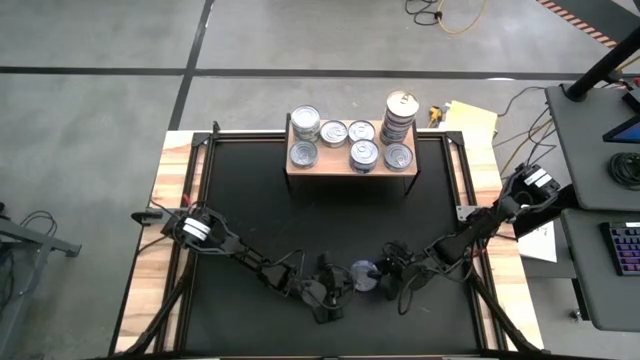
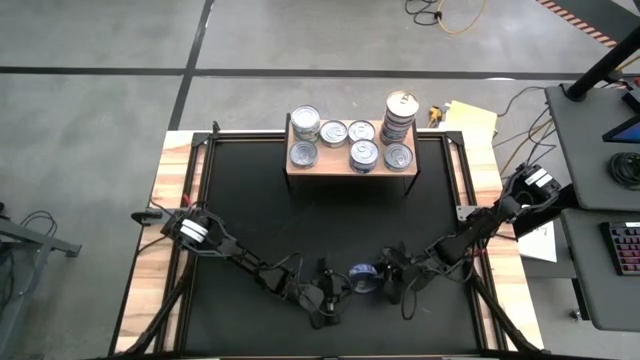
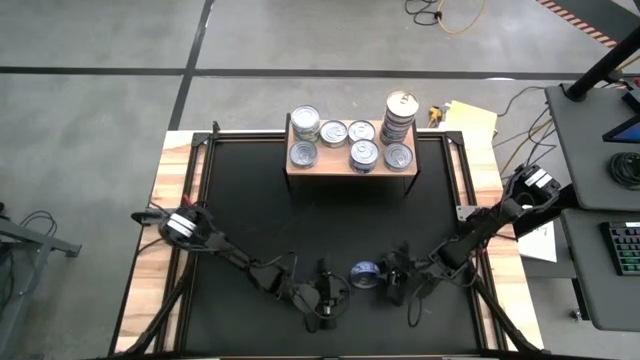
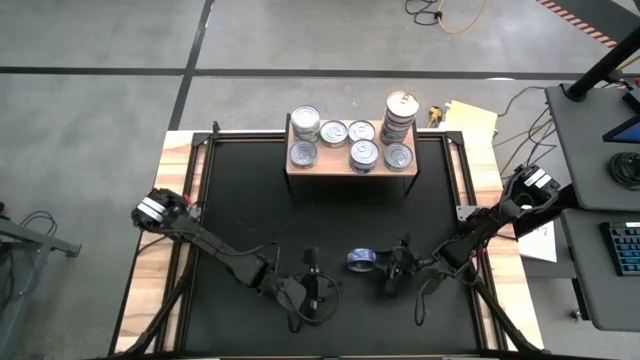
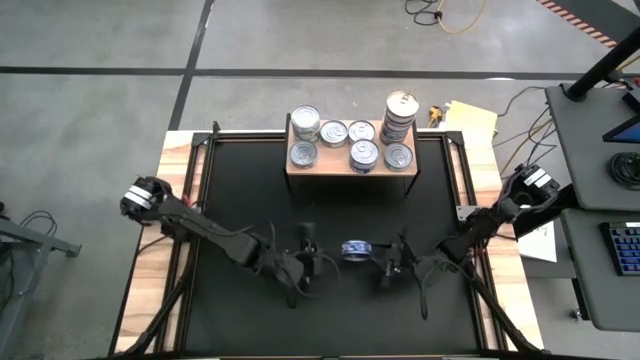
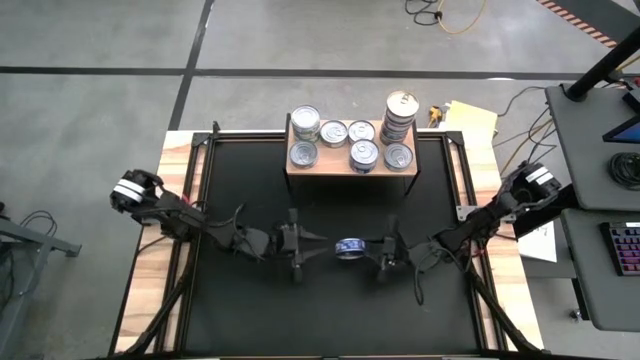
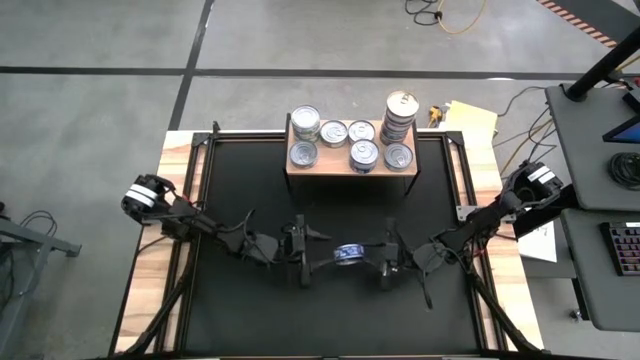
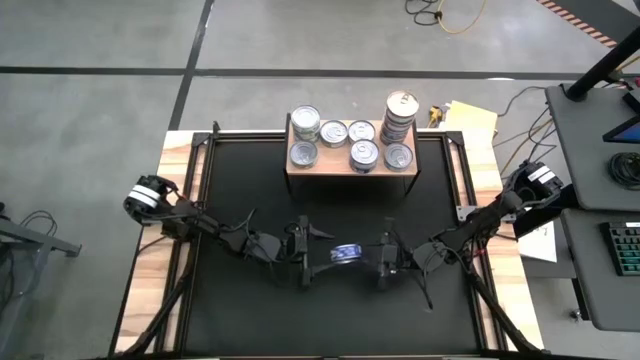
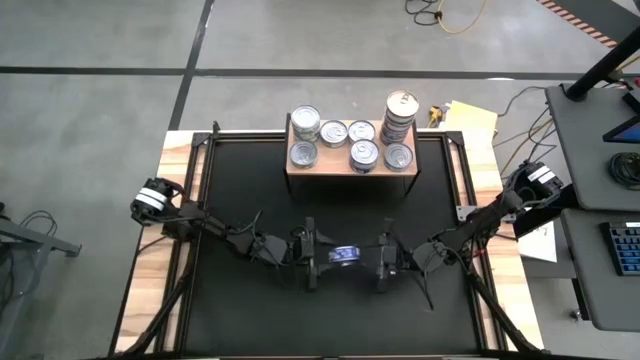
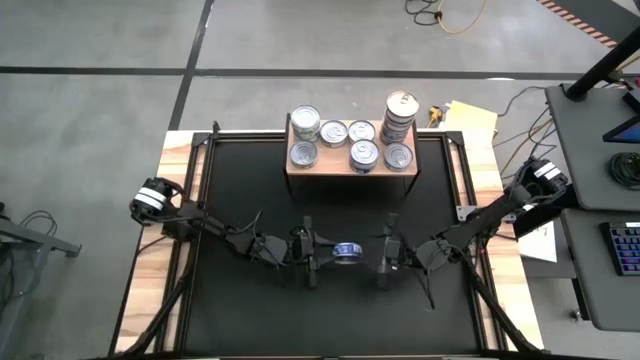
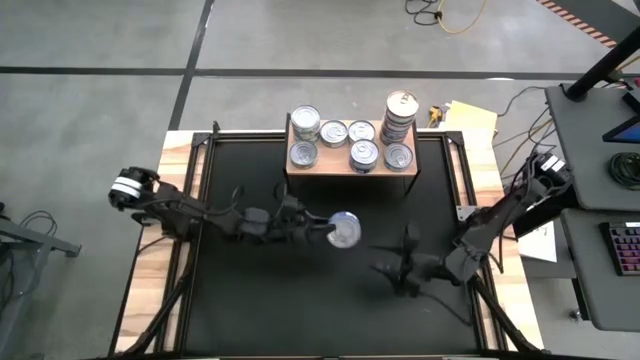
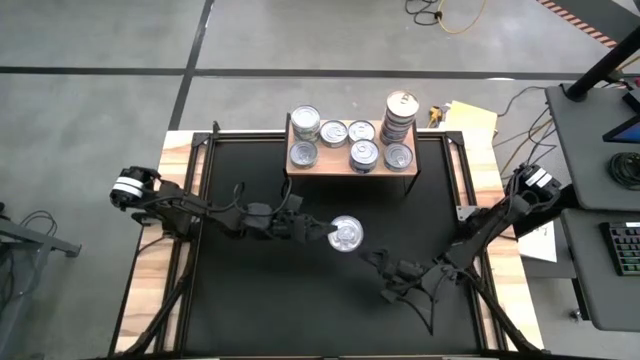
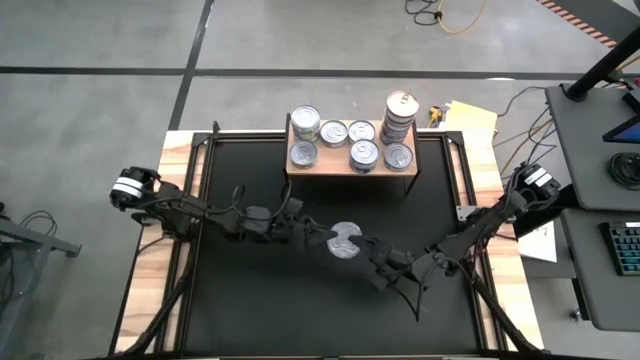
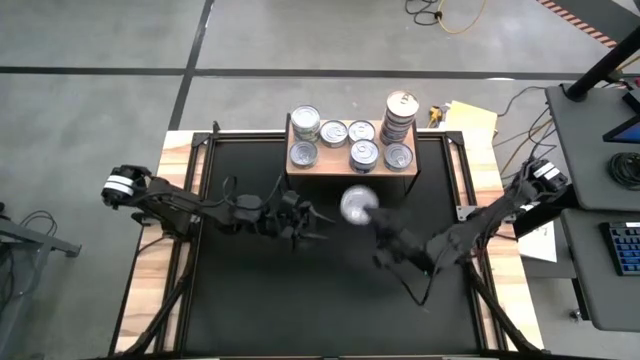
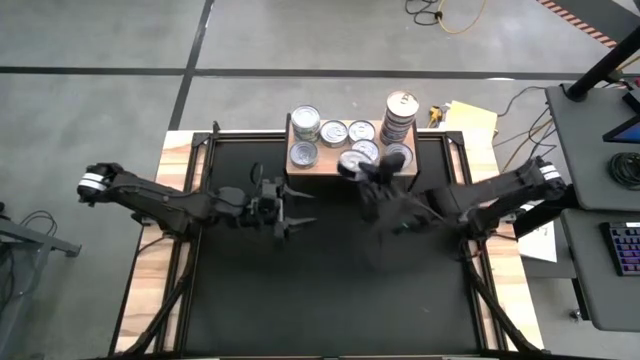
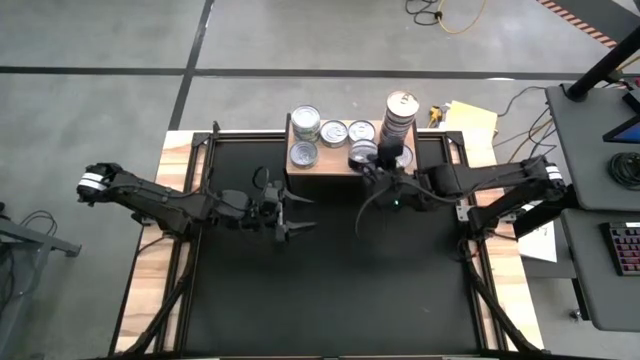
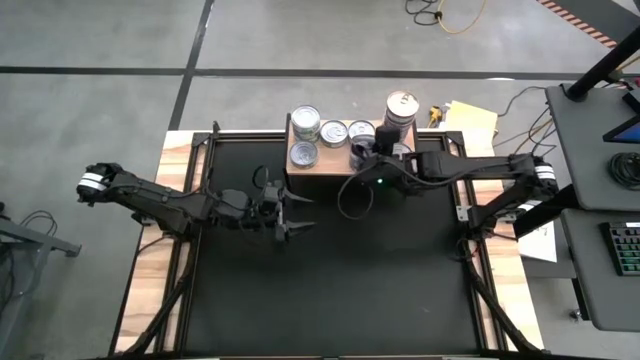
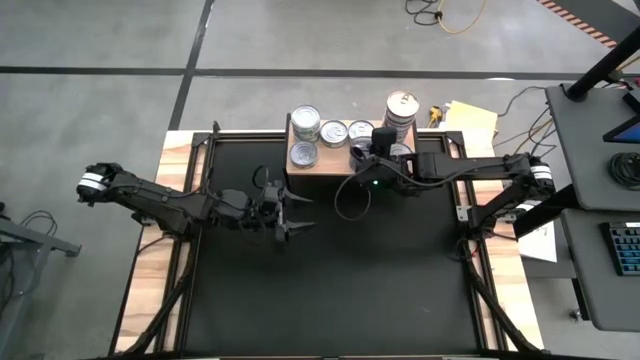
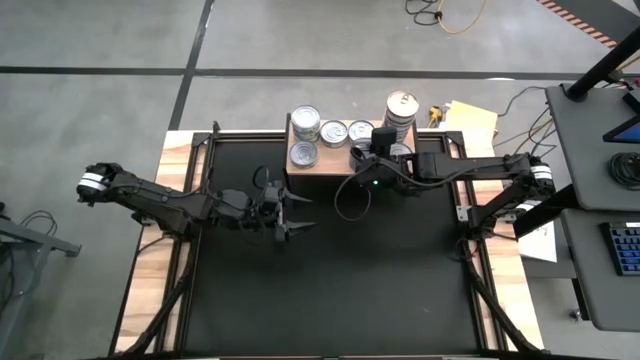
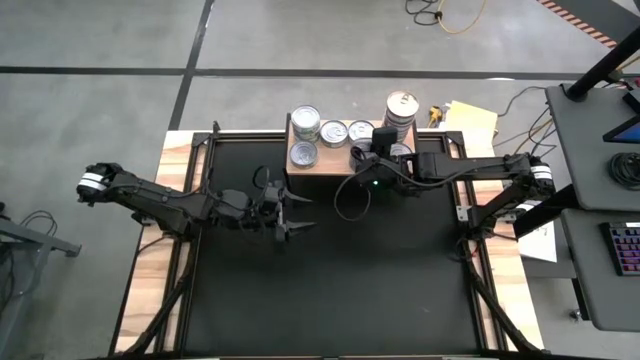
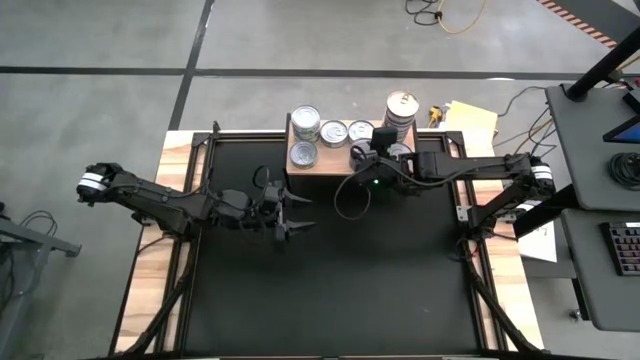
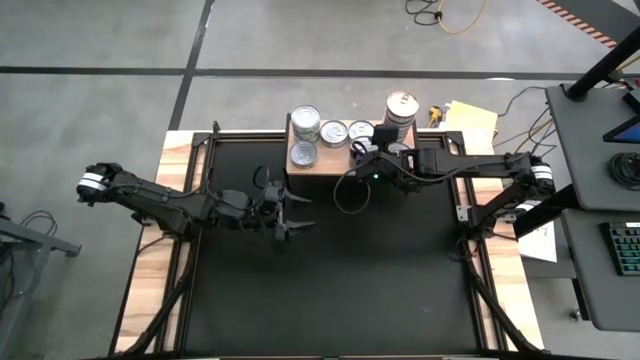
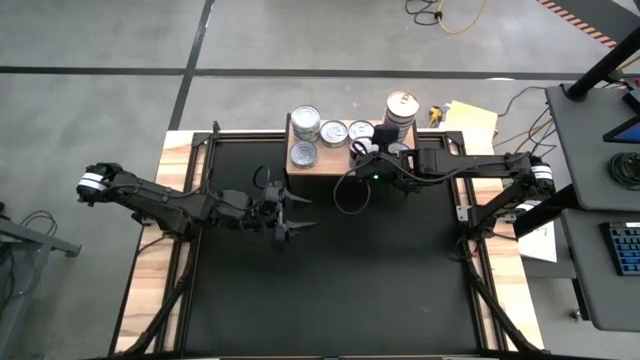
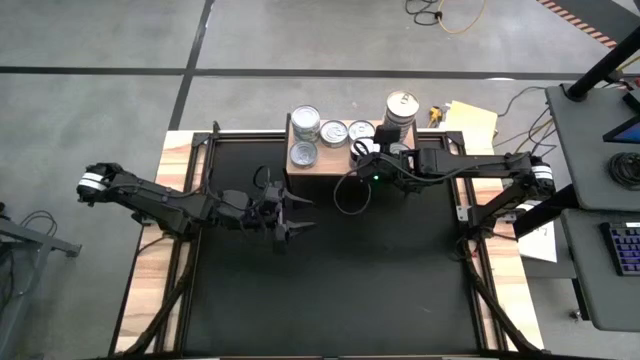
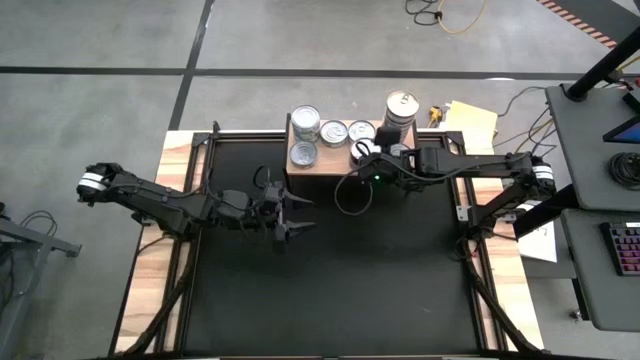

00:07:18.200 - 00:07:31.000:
Task: Stack canned seafood by type on shelf
Stack the blue tuna can on top of the blue tuna can on the shelf

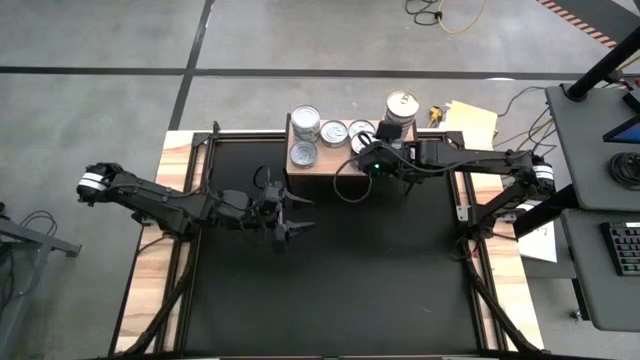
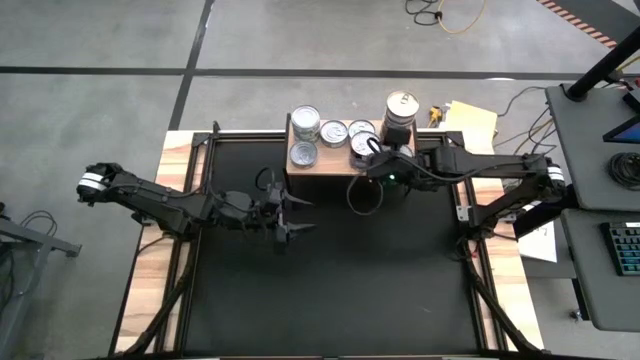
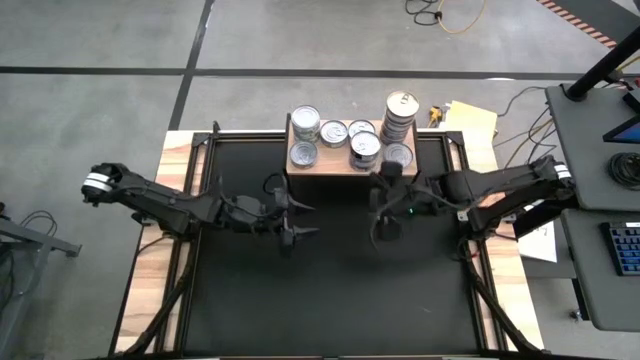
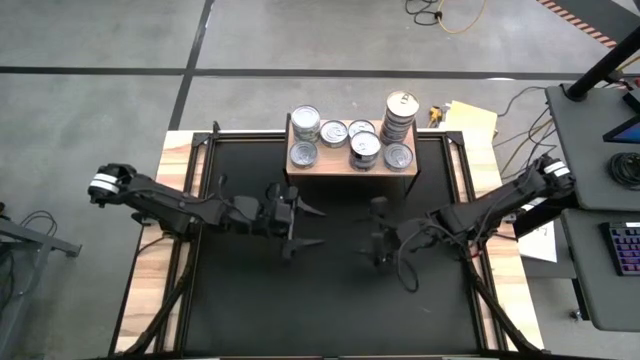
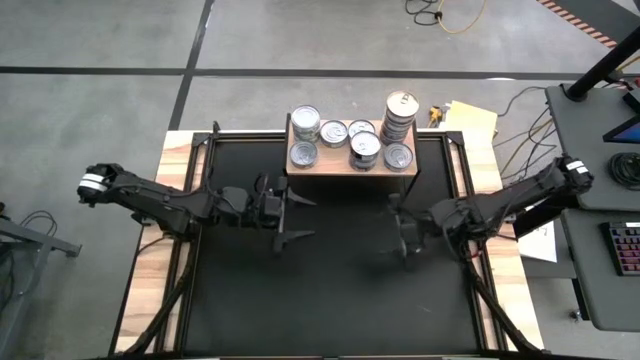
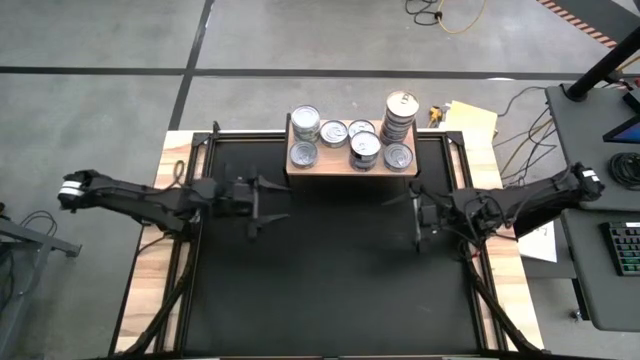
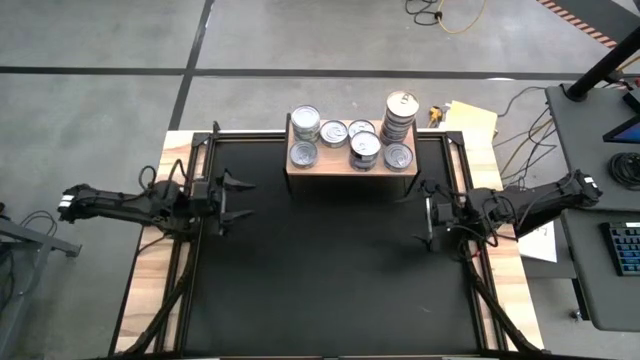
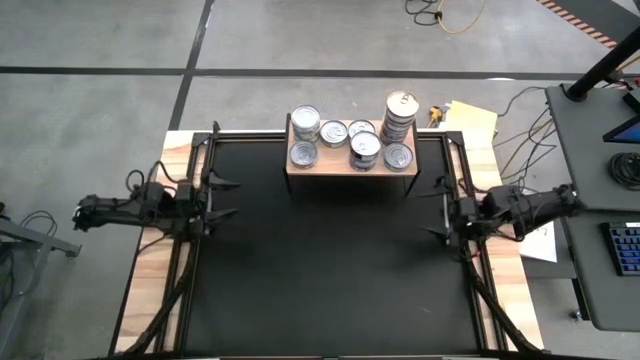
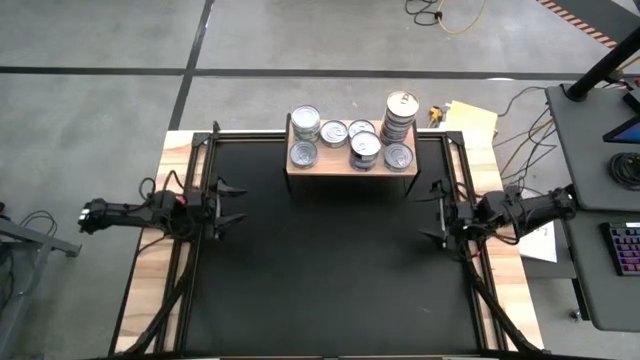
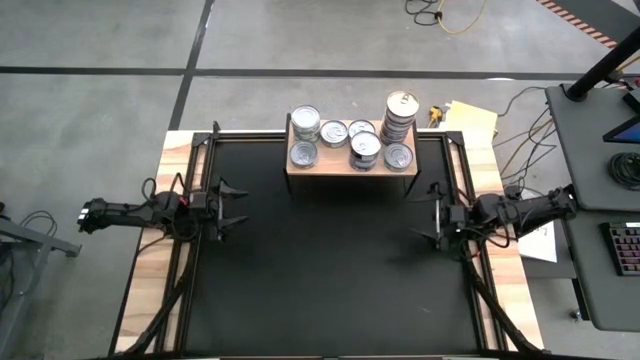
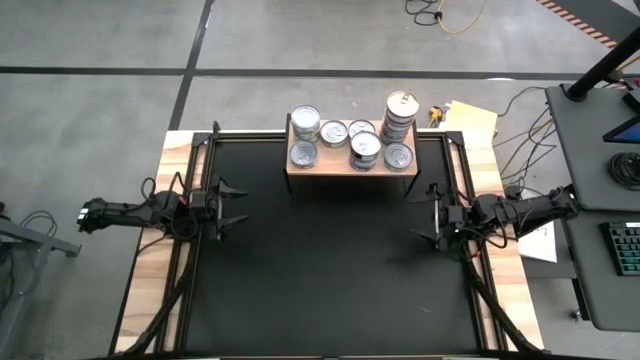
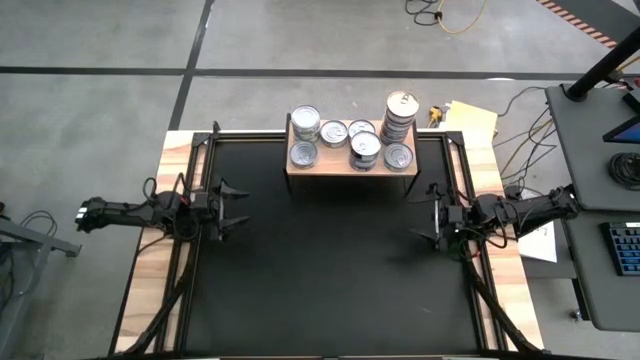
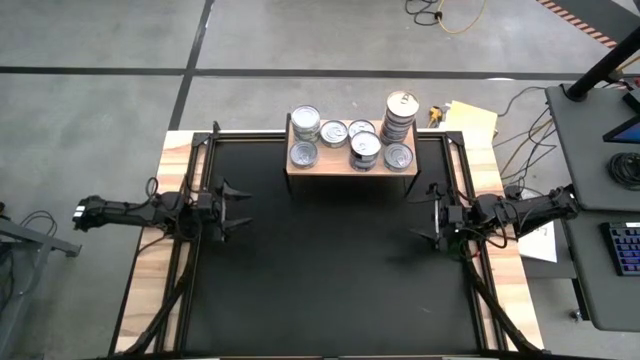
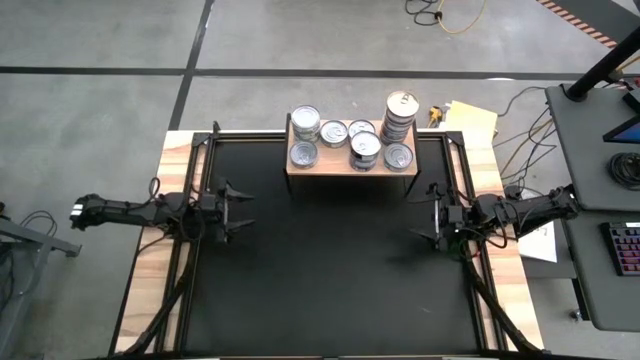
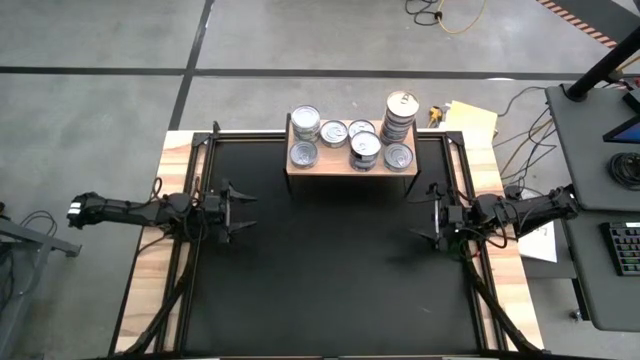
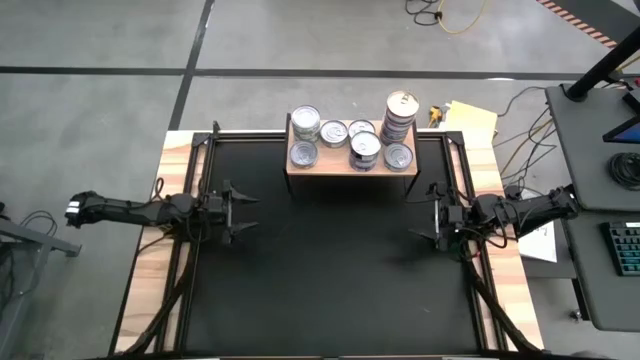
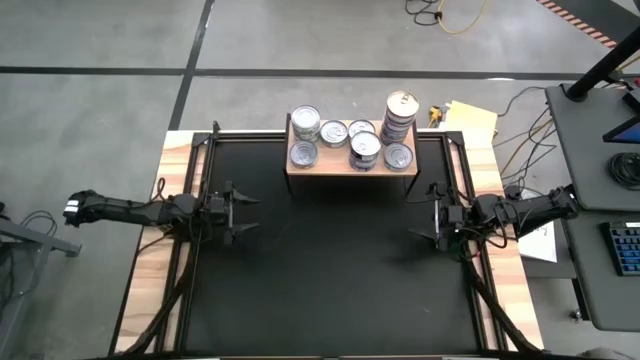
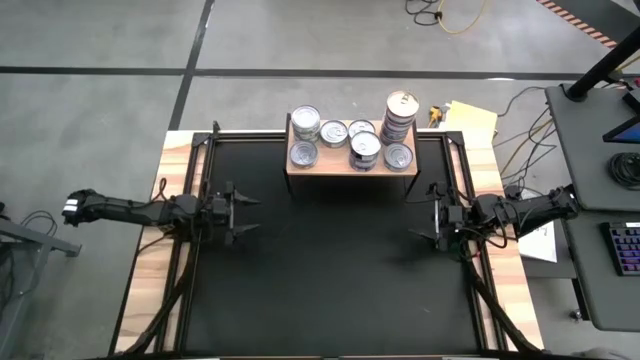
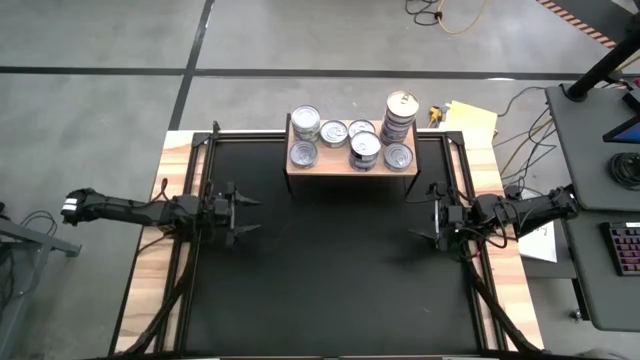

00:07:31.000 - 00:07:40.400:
Return to Home Position
